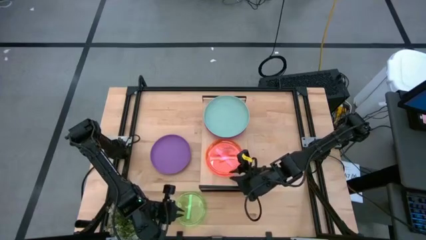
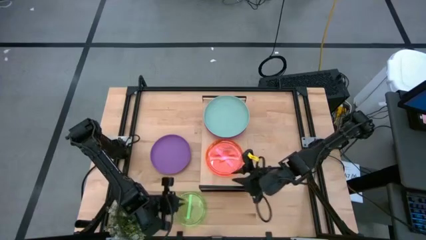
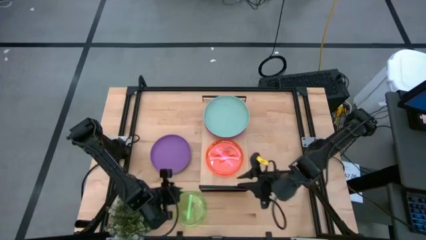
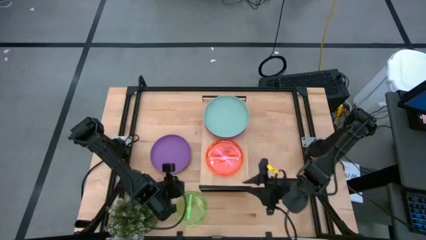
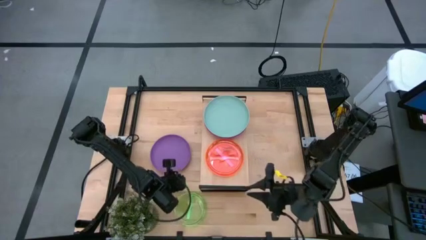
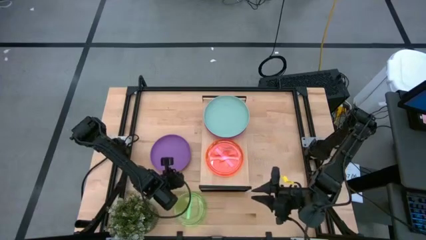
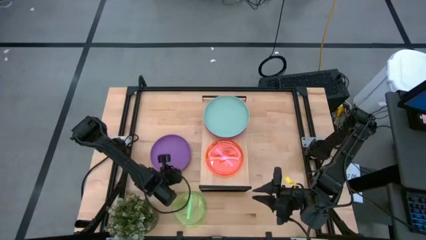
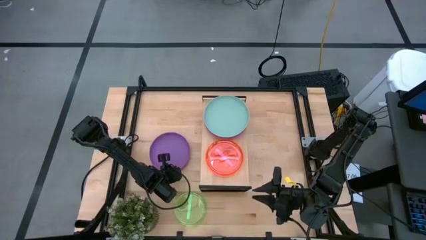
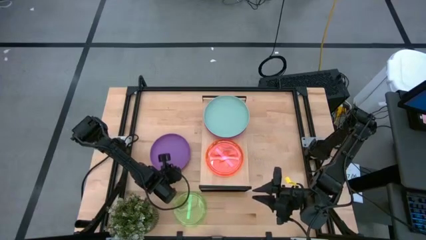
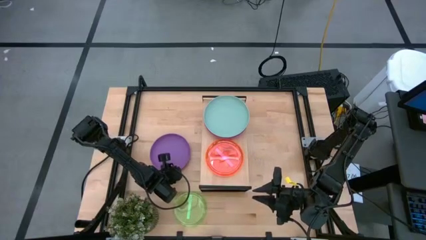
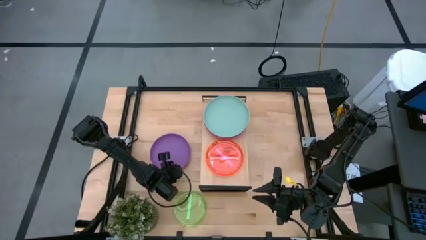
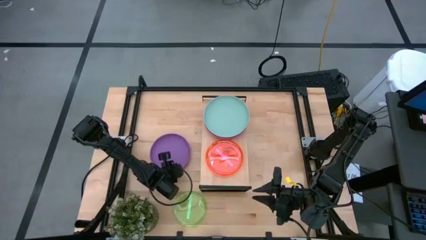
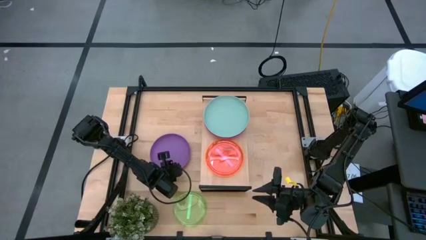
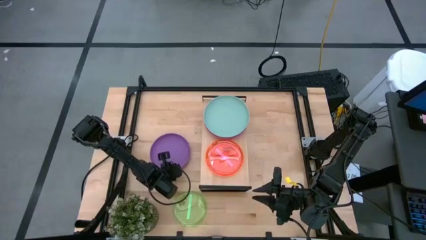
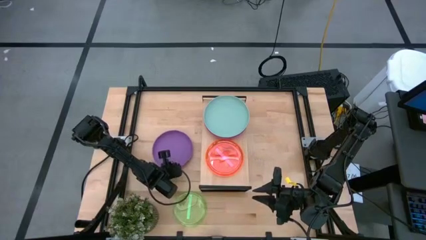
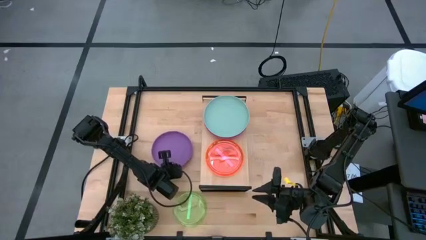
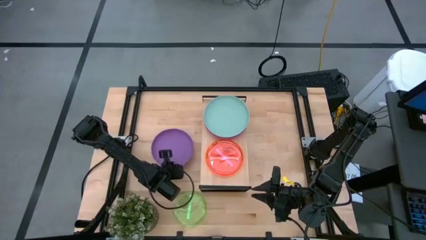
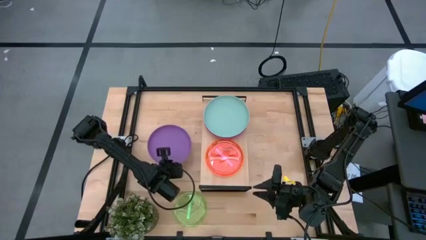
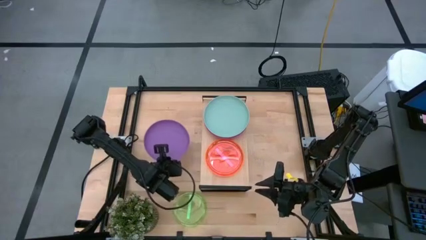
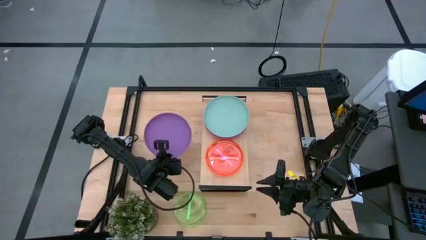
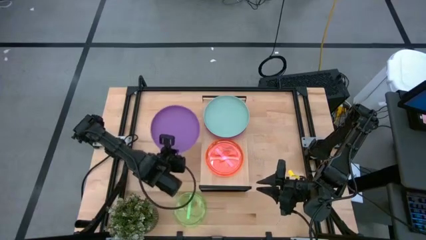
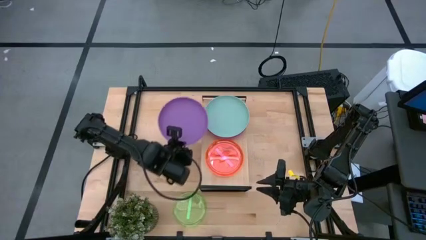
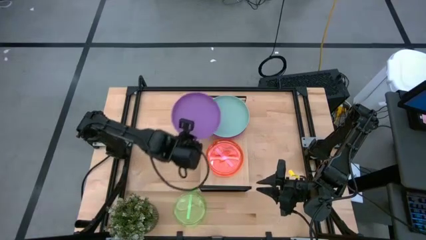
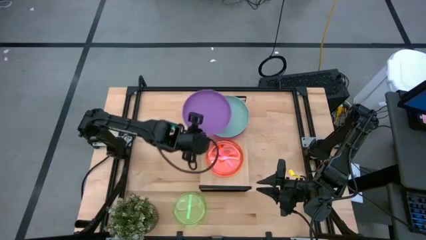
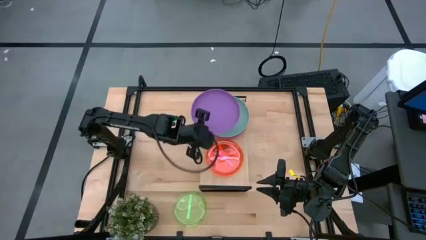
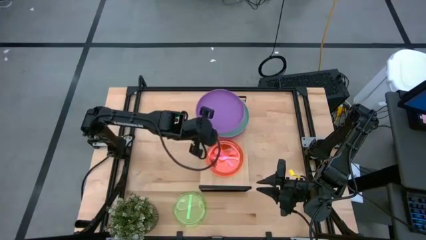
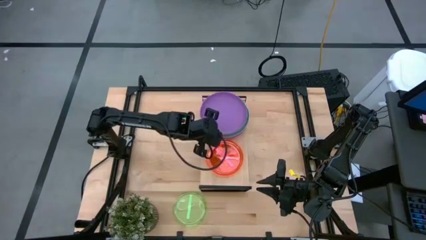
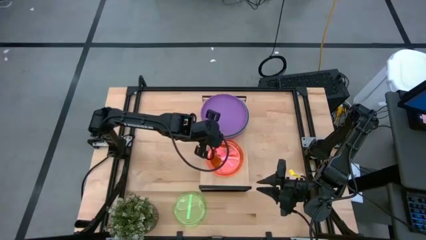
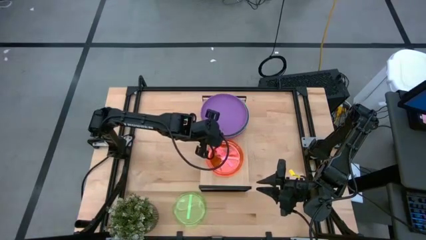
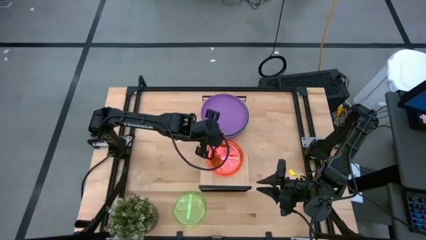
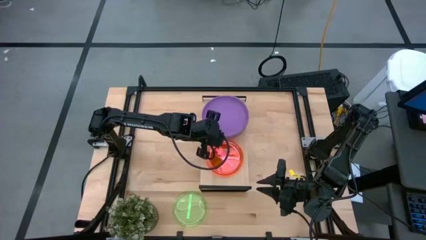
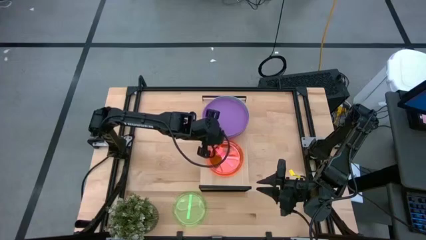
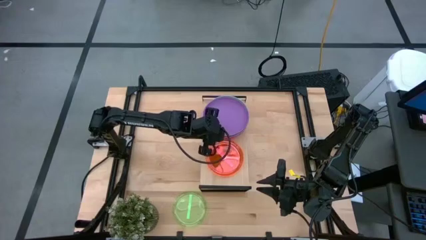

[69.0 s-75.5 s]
Task: Place and stack plates onto a shelf
Stack the violet plate on top of the light blue plate on the shelf

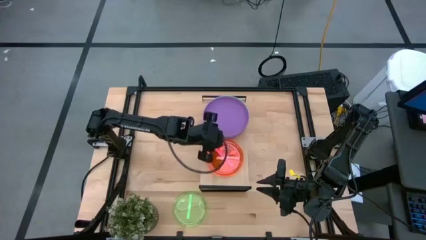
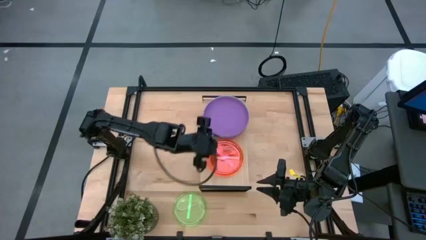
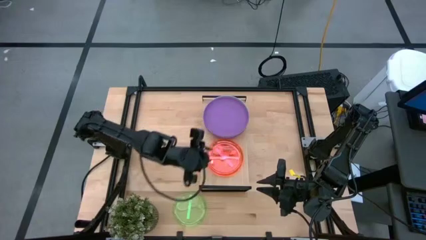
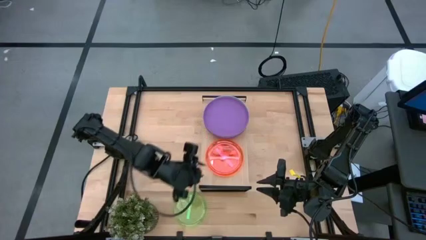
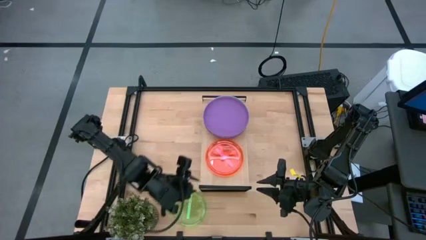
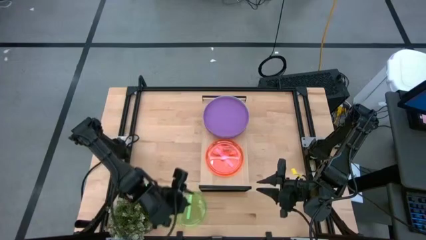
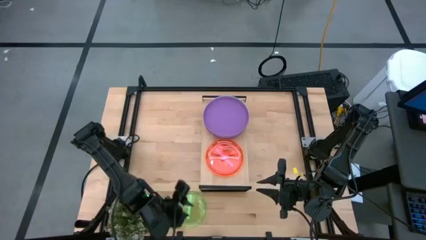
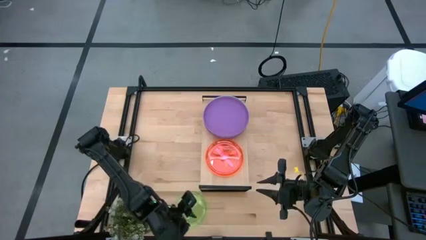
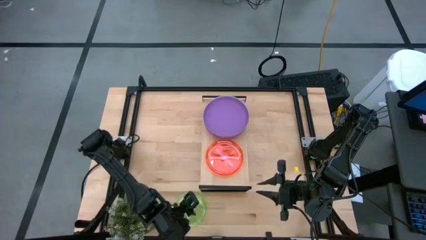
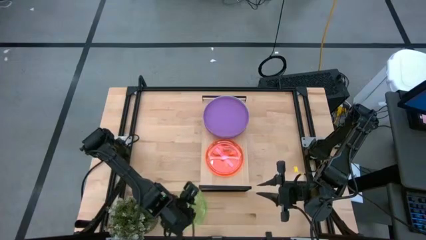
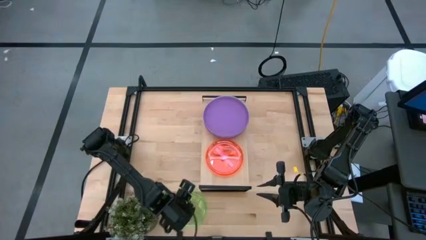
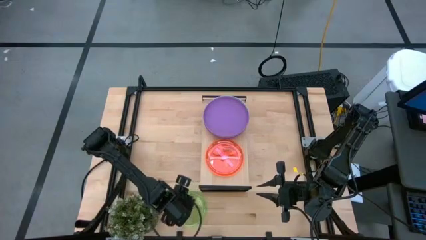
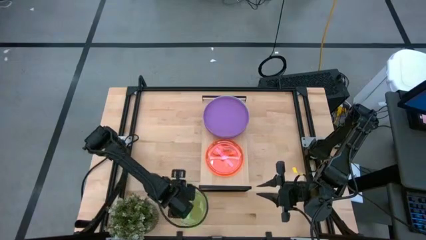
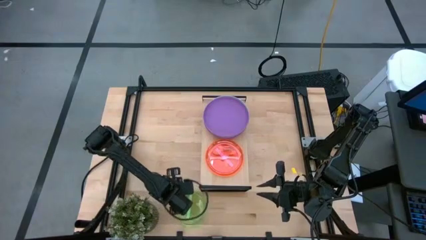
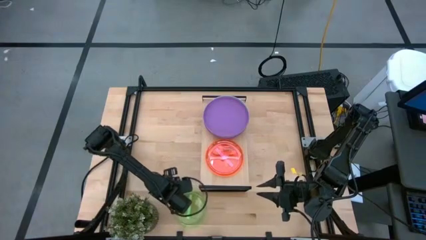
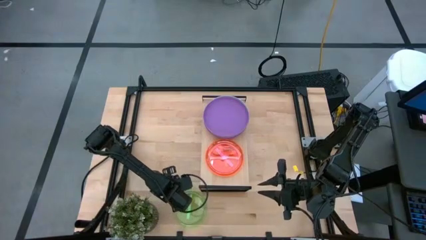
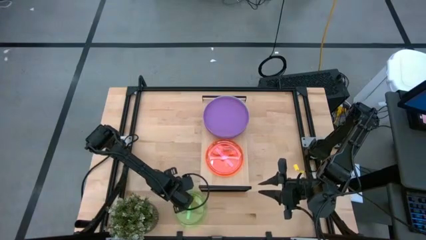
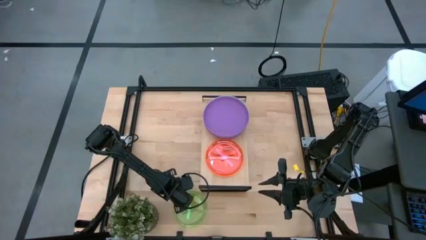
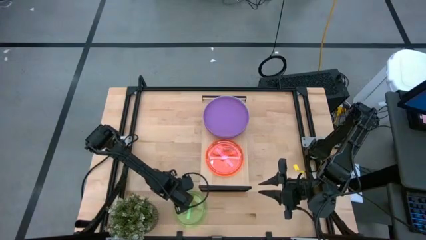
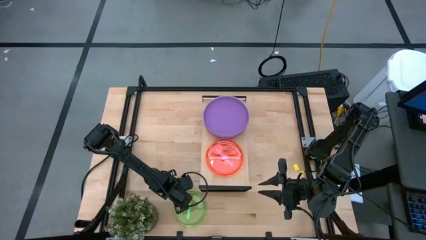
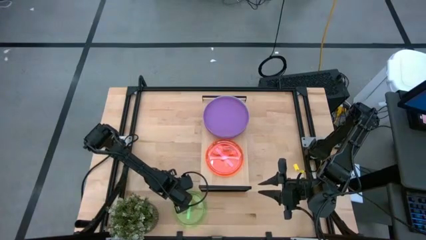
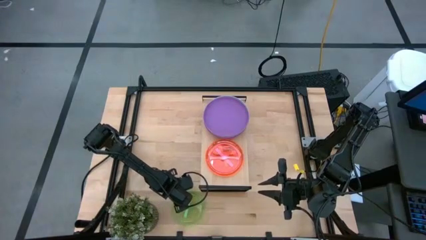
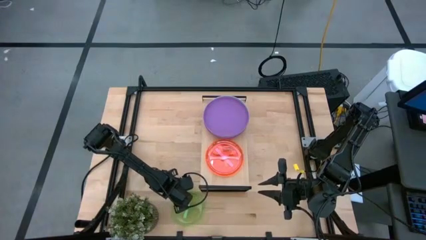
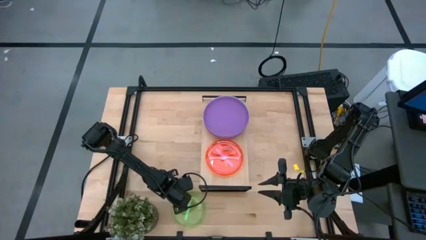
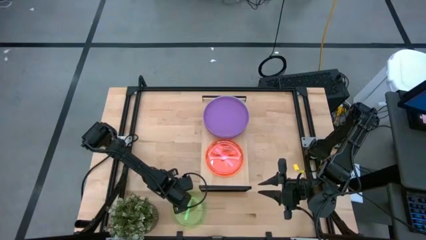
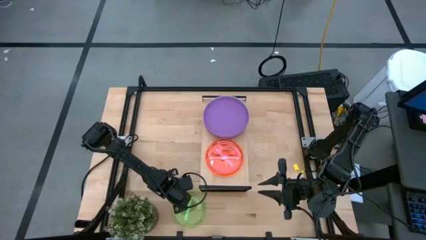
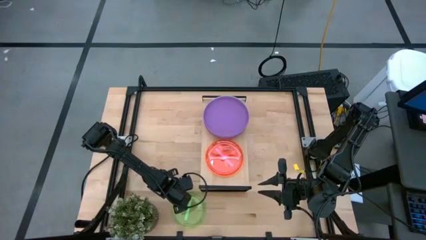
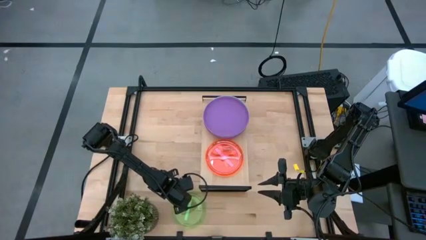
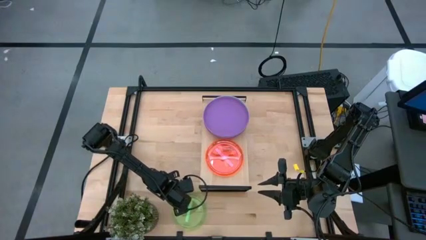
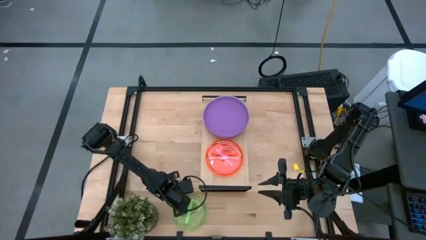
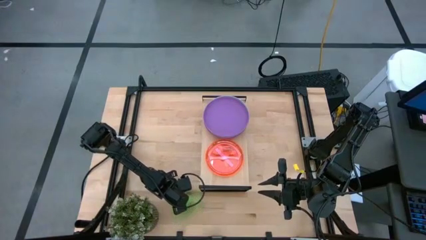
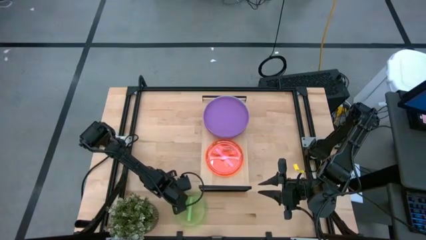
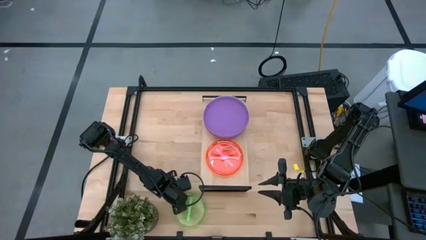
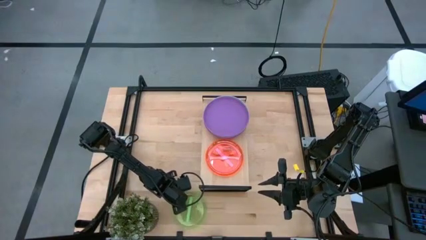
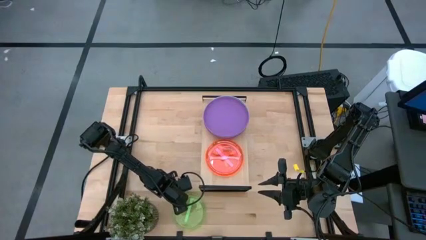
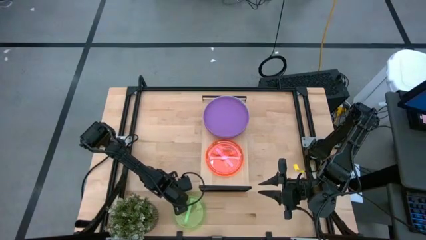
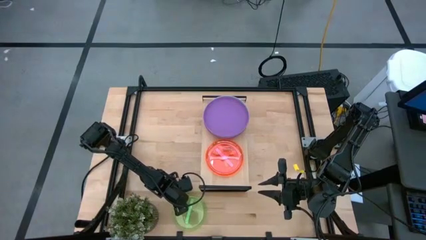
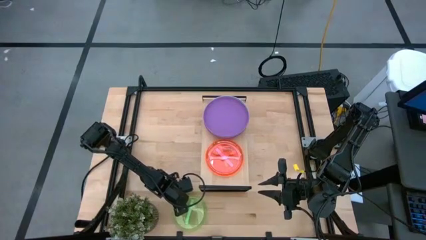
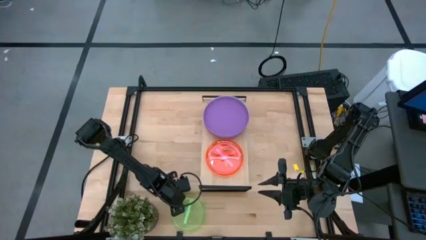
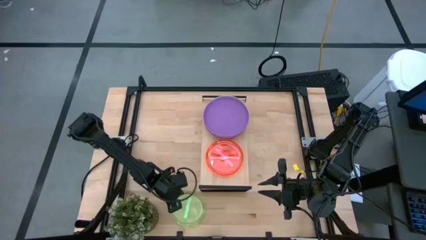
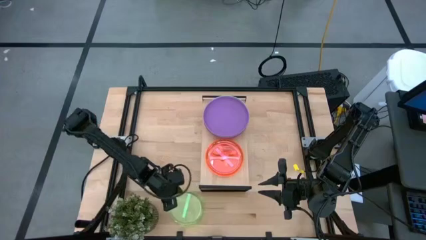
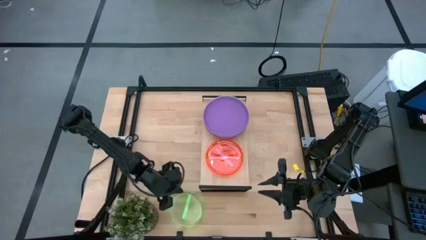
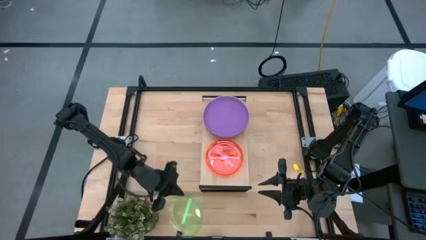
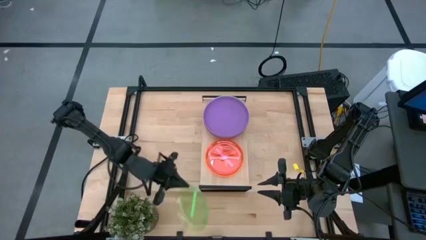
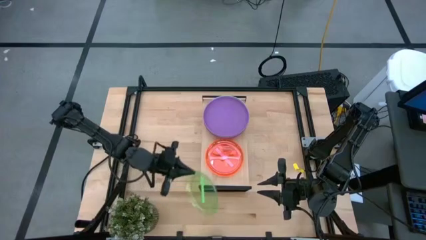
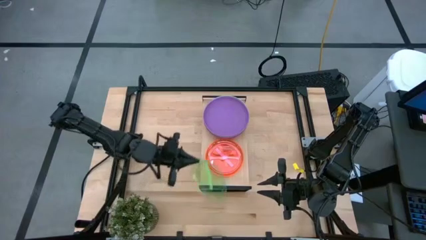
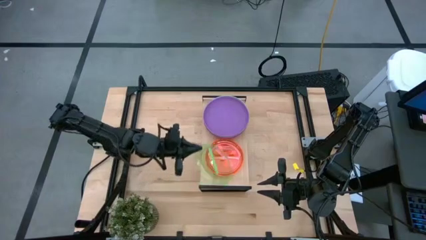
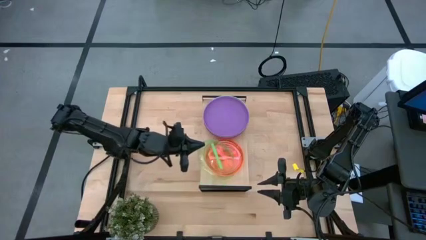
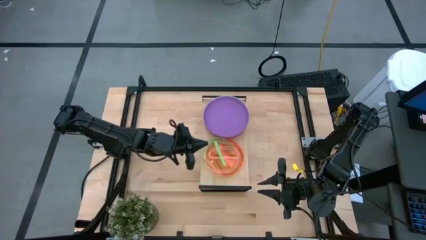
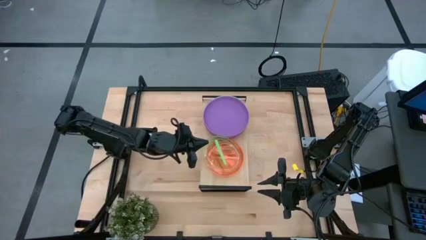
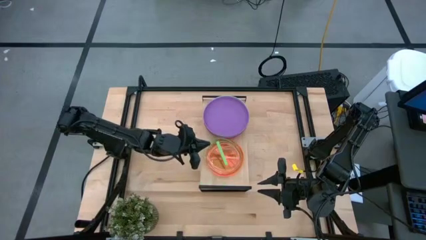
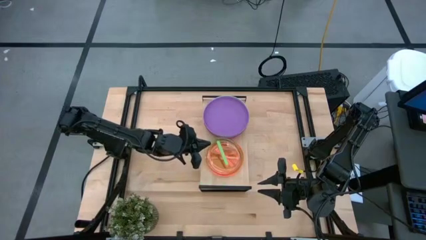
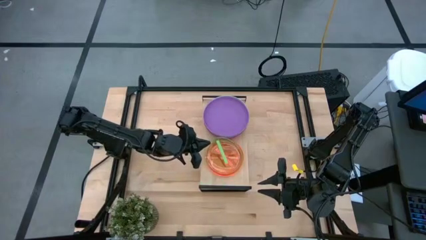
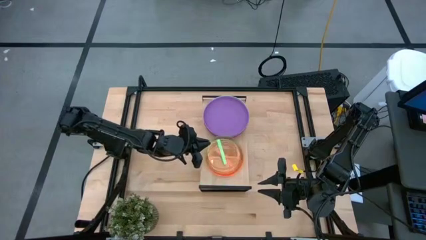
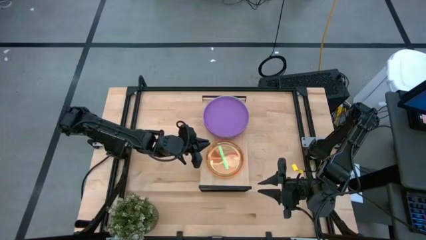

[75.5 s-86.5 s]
Stack the transparent green plate on top of the transparent pink plate on the shelf
